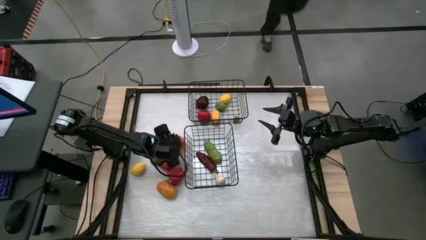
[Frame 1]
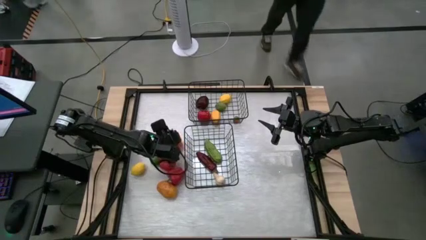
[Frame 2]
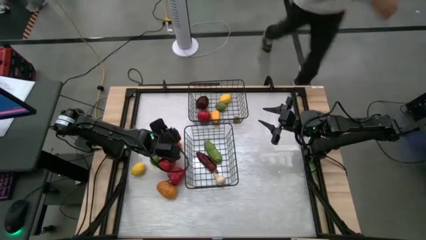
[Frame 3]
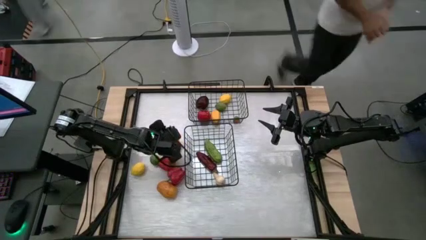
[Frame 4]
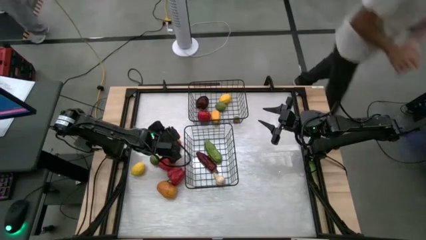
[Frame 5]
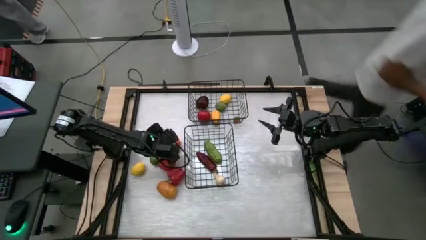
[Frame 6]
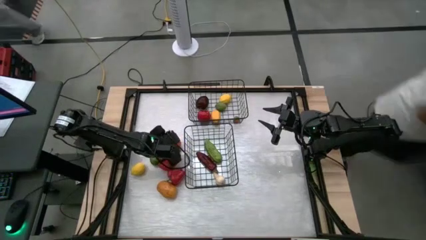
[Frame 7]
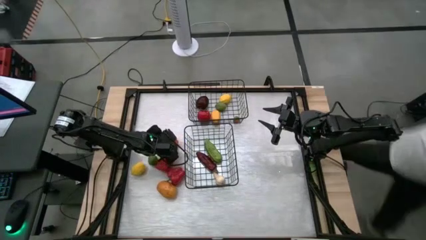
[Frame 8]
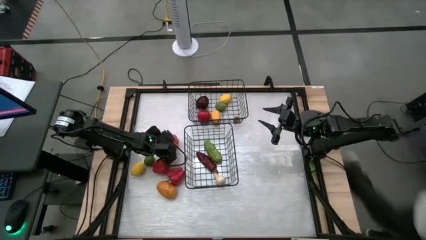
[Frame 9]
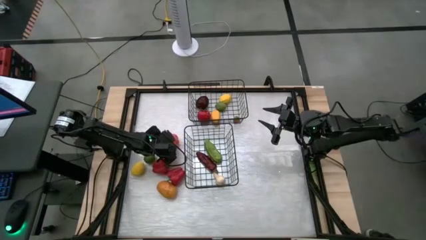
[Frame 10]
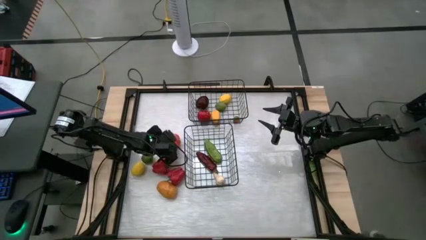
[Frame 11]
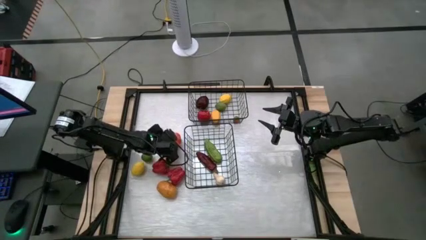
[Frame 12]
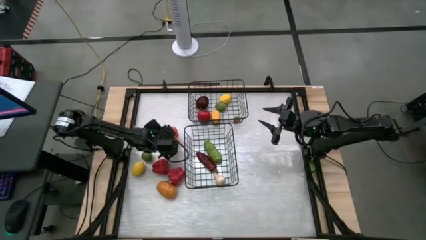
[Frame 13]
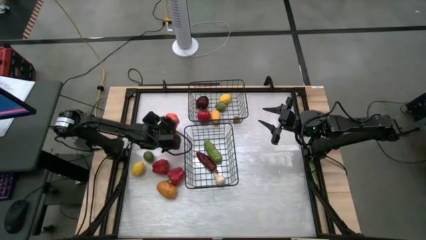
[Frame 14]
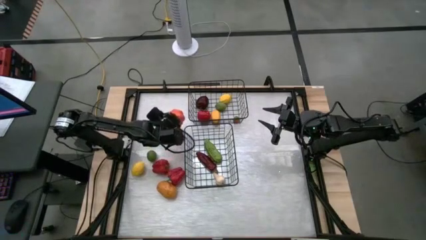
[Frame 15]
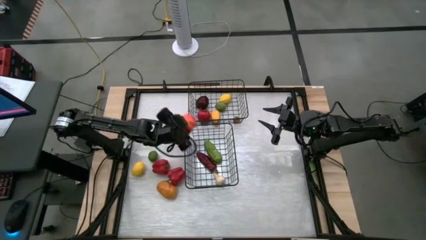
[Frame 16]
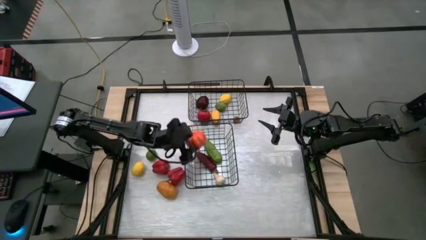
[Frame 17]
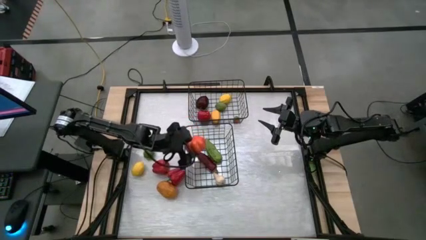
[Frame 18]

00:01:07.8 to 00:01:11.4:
Task: Sort produce into baskets
Put the orange pumpkin into the bottom wire basket

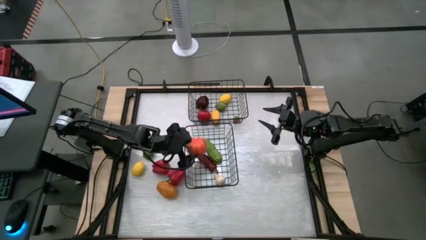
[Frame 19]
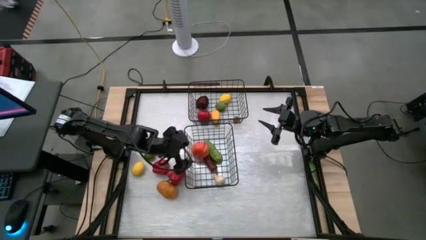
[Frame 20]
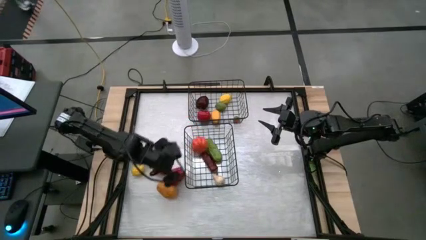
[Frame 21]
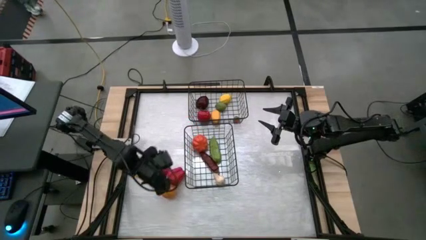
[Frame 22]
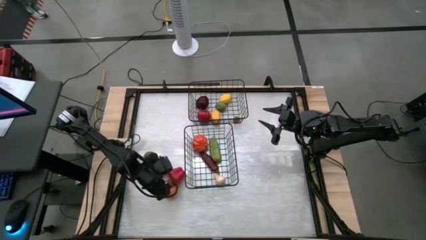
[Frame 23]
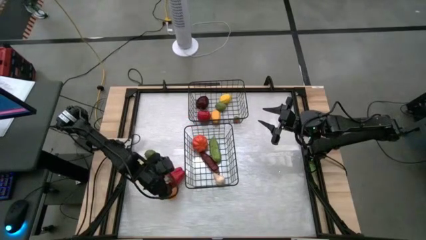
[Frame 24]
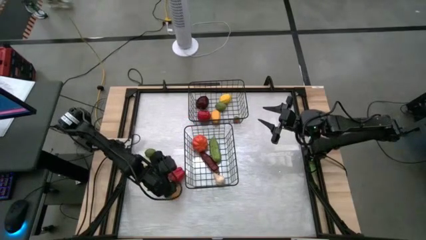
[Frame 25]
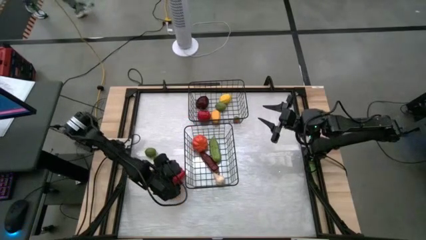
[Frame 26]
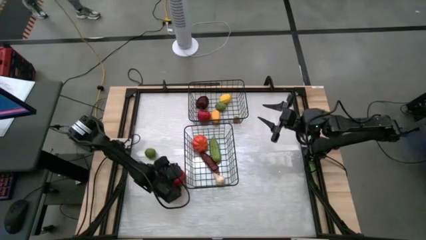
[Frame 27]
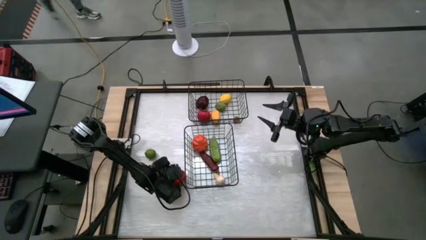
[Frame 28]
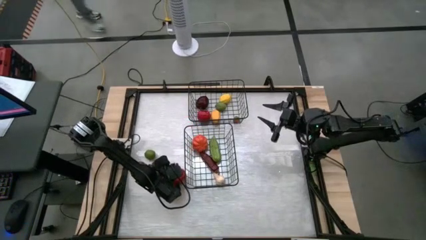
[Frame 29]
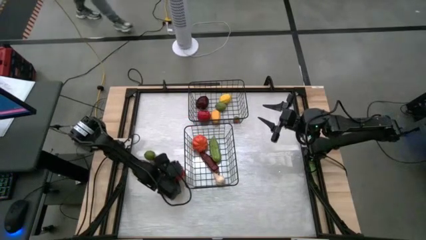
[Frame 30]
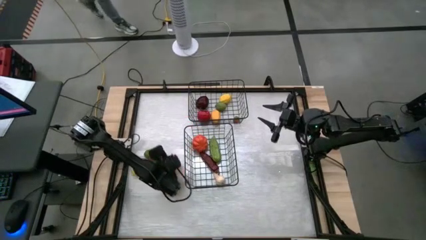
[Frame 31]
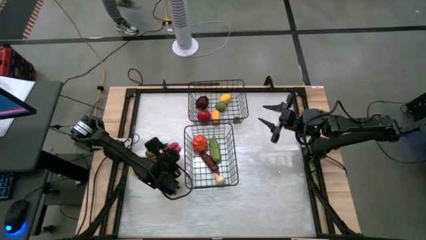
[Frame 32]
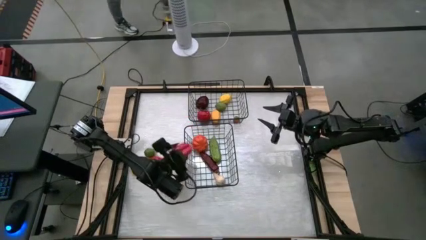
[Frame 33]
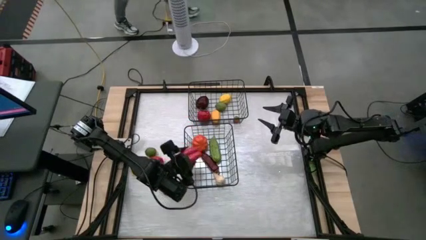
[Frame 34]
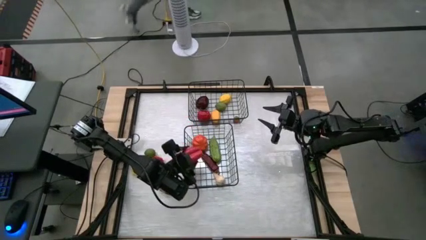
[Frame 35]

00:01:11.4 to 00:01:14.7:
Put the right red bell pepper into the bottom wire basket

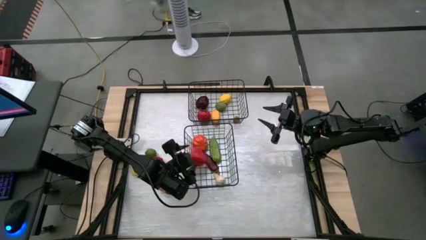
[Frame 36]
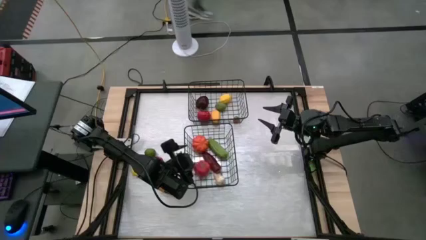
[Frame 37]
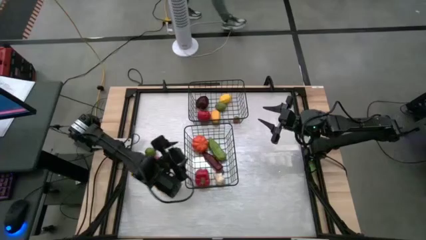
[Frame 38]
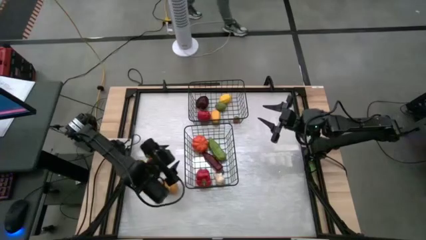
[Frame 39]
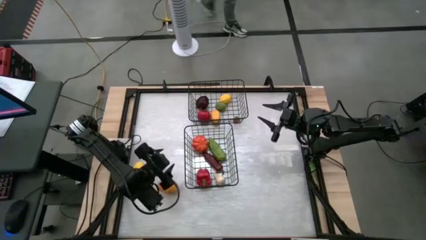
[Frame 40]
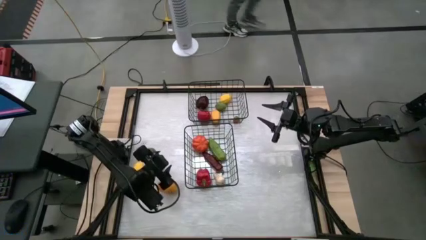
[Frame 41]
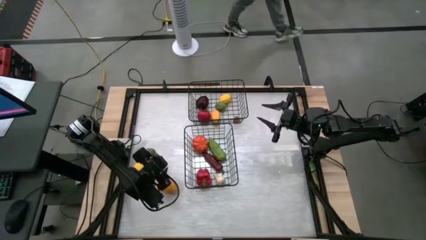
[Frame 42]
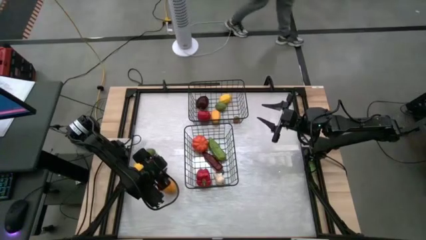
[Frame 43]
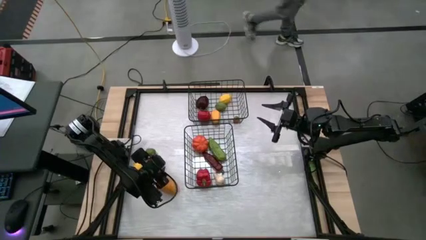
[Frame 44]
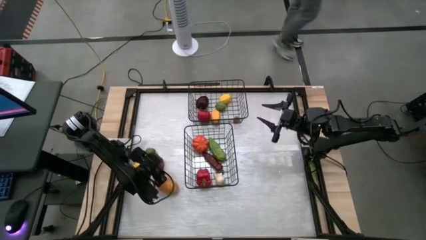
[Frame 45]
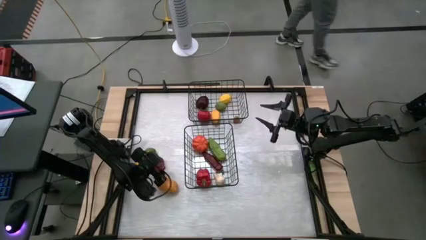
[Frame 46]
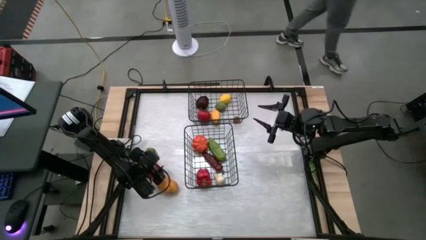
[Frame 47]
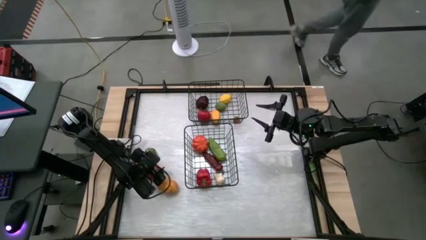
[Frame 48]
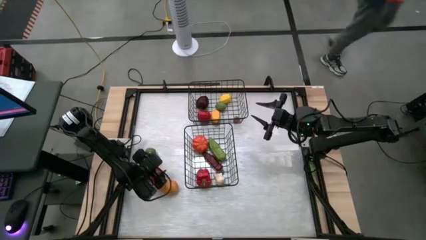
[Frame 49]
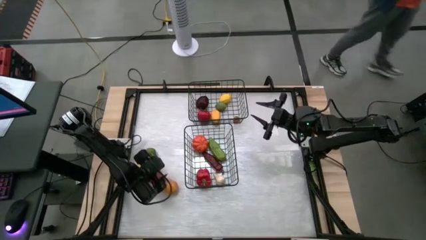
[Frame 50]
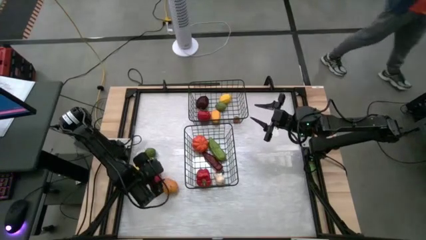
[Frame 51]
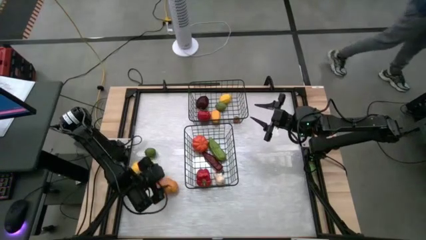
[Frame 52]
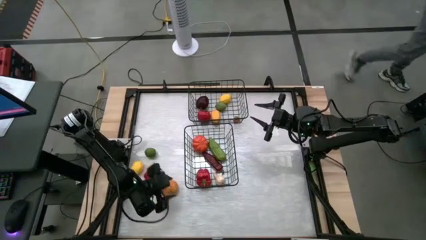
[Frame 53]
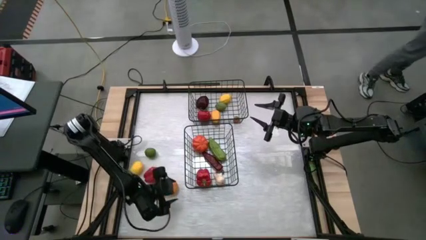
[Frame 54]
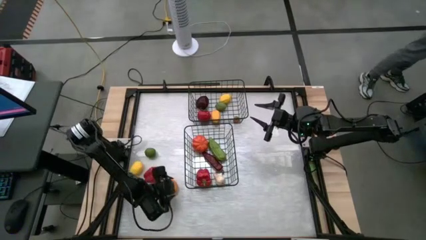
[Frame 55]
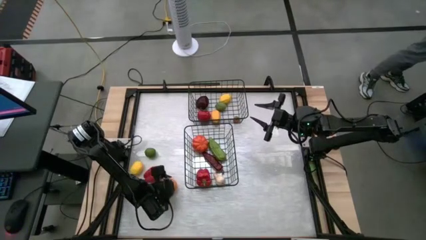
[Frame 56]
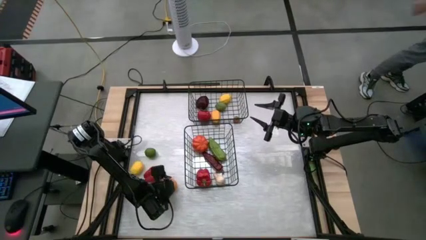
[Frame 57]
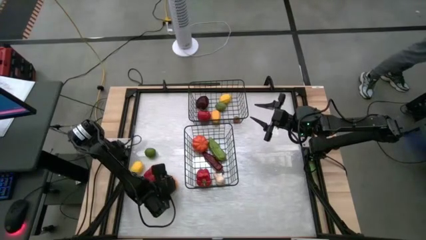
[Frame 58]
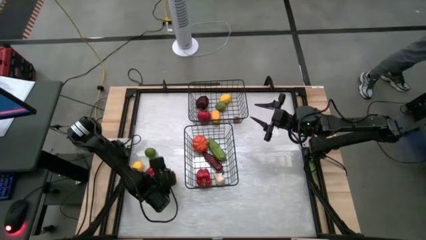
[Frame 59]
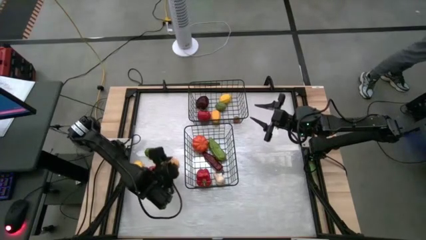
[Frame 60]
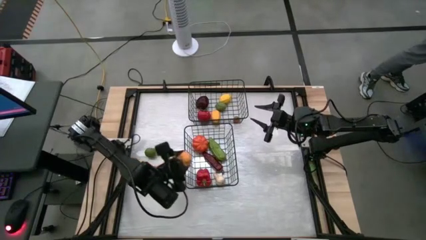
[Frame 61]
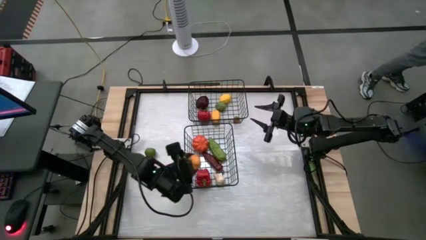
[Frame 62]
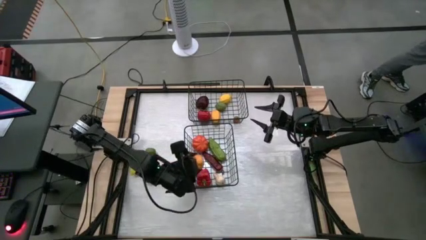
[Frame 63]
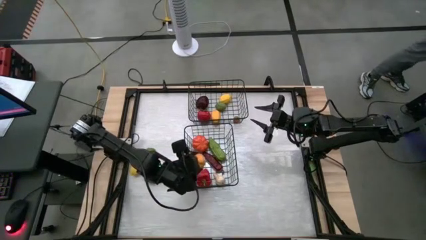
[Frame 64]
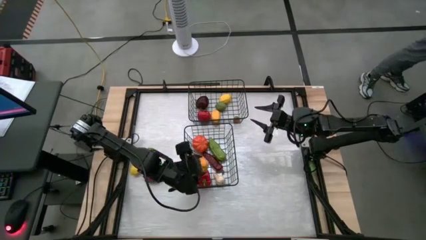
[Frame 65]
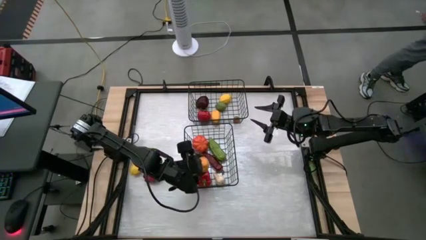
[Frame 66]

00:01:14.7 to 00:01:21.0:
Put the potato into the bottom wire basket

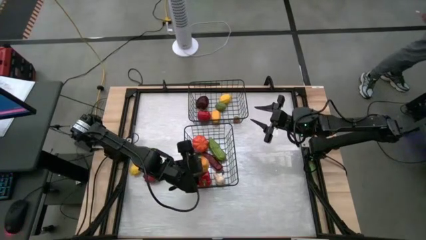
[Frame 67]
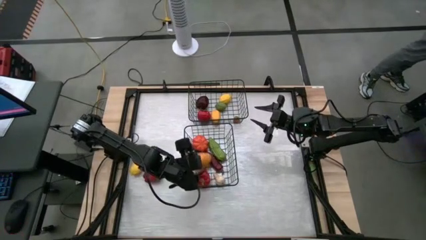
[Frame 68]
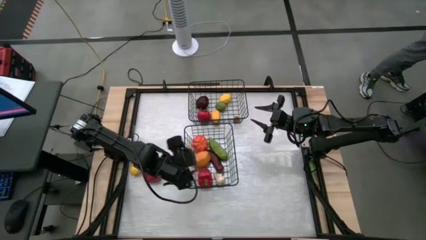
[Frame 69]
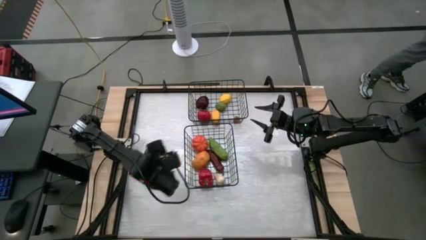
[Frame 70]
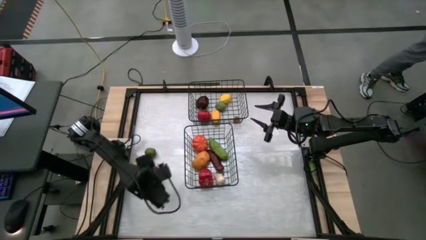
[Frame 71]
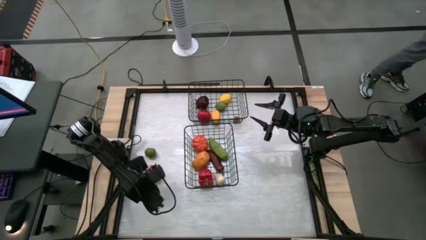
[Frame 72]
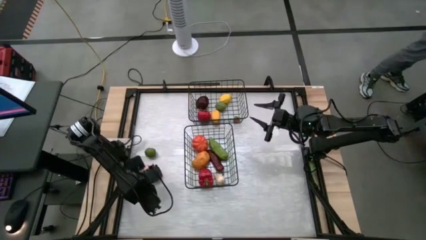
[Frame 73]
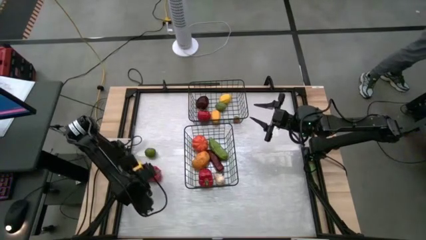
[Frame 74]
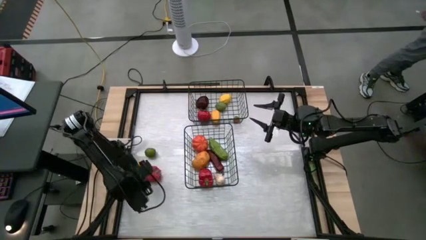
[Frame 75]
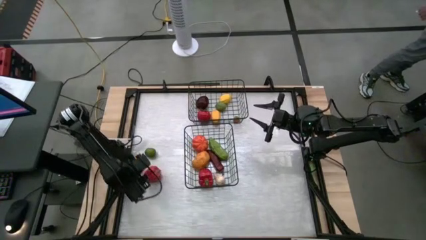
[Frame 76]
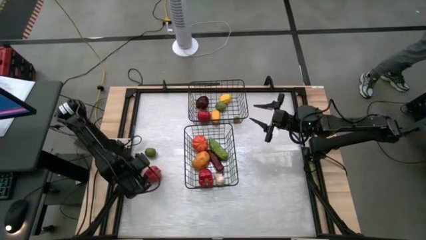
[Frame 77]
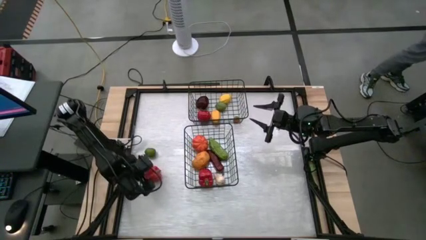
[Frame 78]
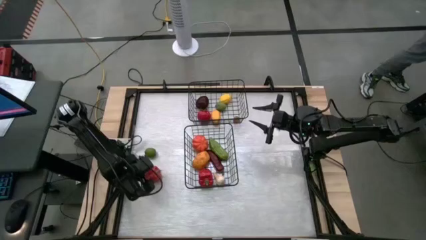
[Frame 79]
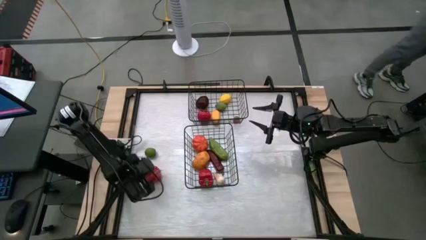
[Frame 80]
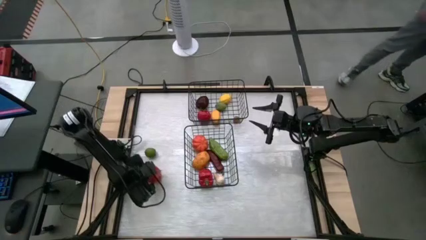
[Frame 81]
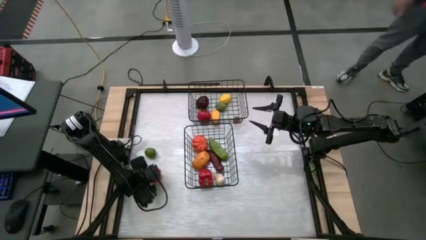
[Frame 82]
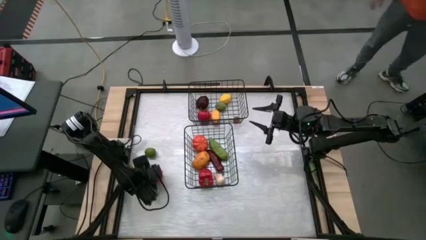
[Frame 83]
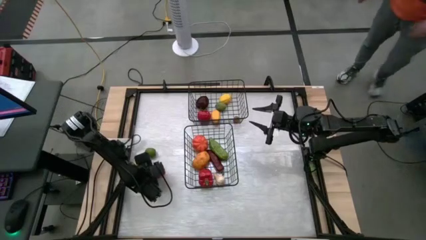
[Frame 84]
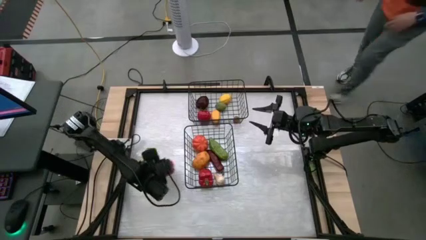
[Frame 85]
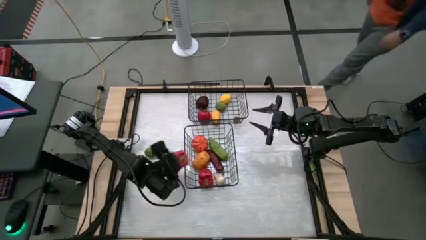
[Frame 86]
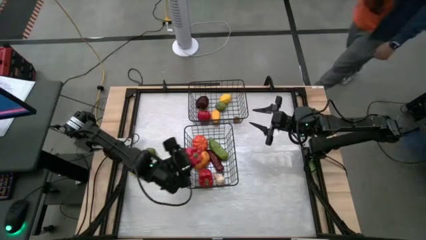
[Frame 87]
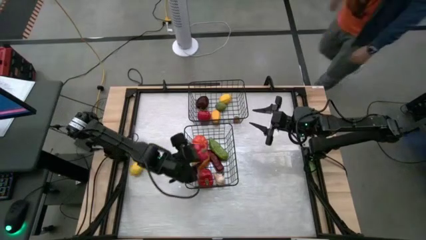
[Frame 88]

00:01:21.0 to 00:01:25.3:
Put the red bell pepper into the bottom wire basket
